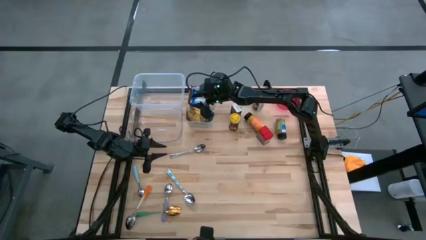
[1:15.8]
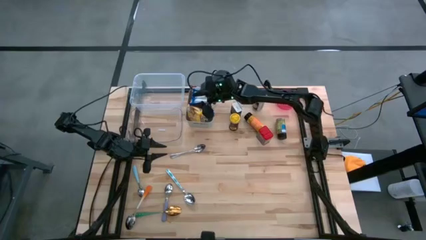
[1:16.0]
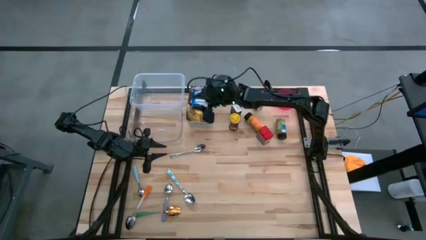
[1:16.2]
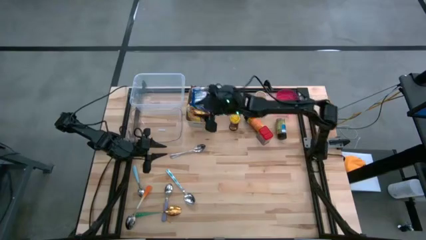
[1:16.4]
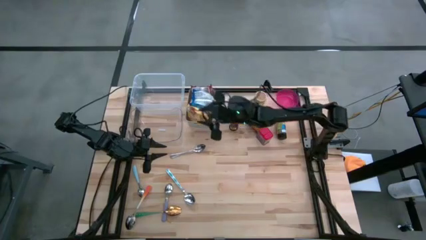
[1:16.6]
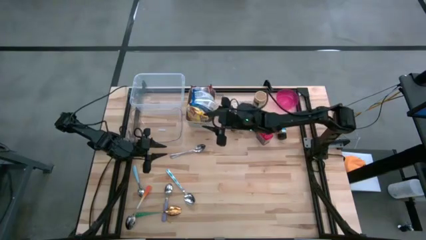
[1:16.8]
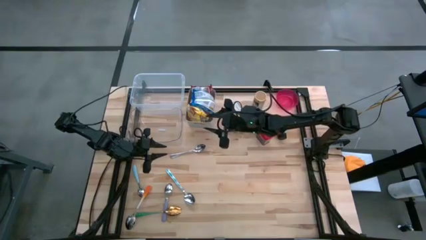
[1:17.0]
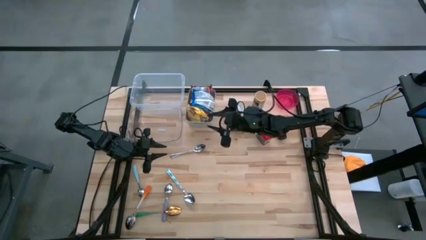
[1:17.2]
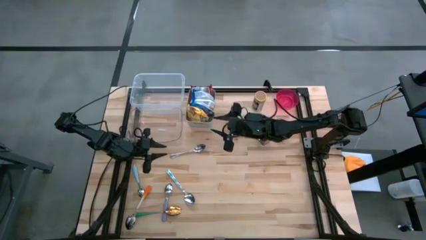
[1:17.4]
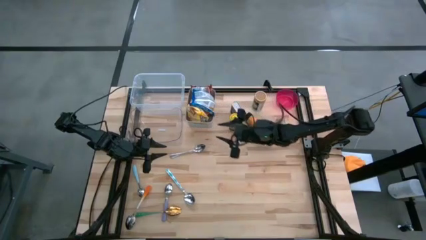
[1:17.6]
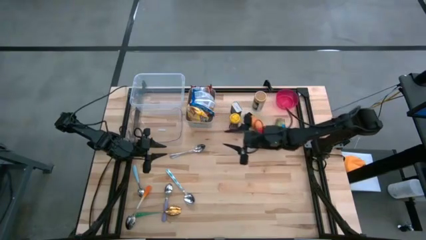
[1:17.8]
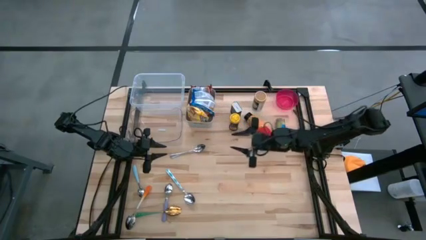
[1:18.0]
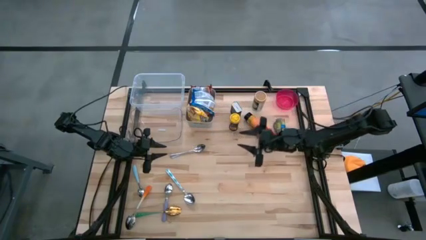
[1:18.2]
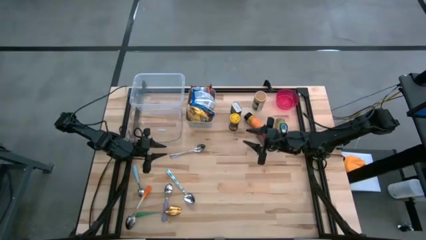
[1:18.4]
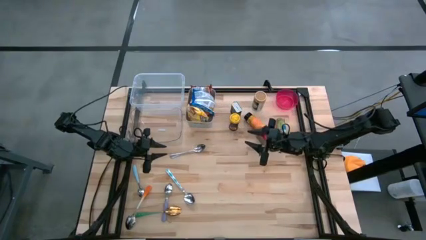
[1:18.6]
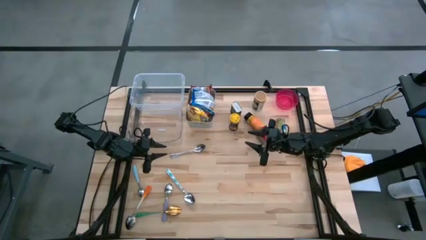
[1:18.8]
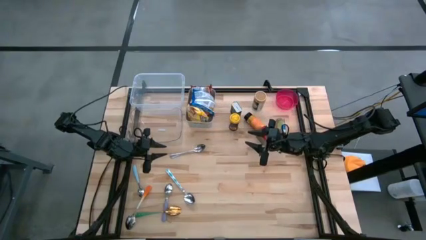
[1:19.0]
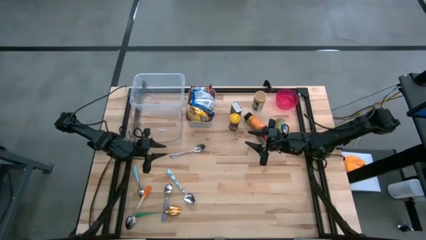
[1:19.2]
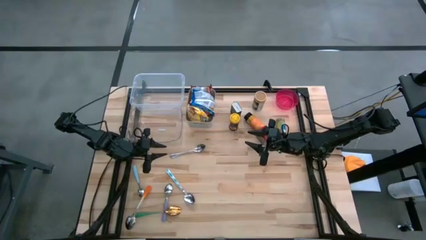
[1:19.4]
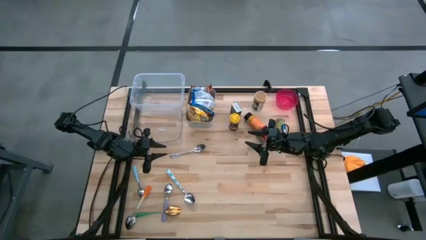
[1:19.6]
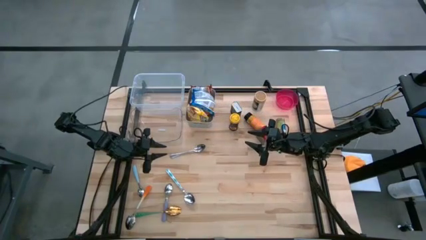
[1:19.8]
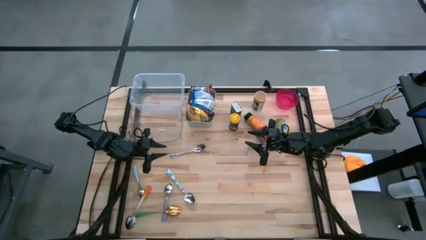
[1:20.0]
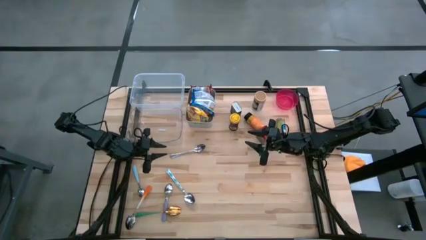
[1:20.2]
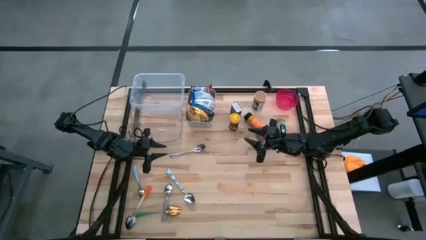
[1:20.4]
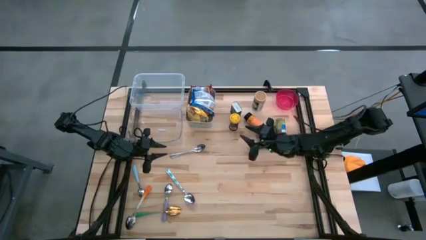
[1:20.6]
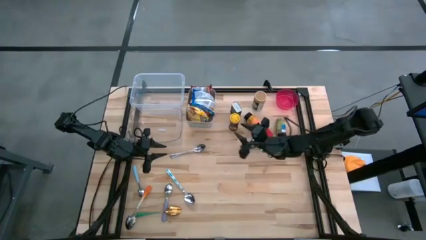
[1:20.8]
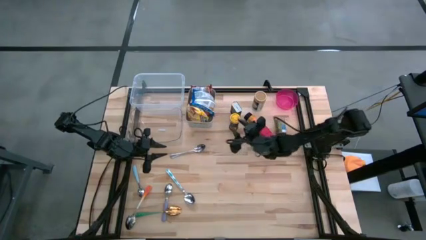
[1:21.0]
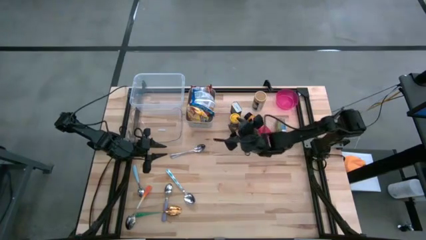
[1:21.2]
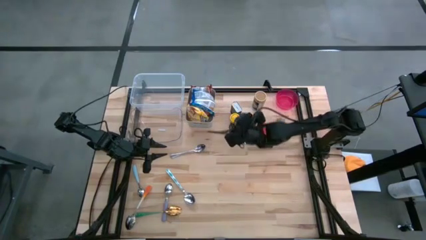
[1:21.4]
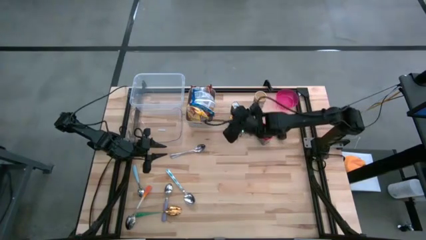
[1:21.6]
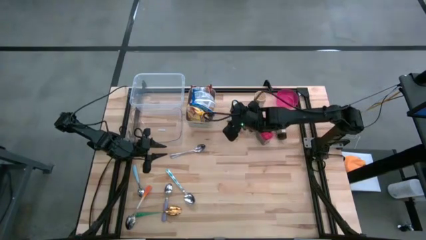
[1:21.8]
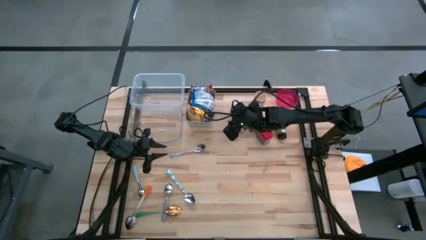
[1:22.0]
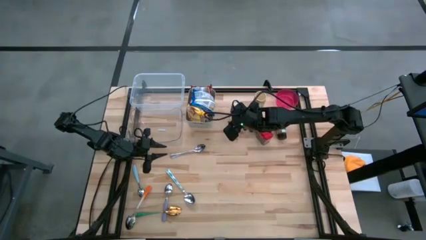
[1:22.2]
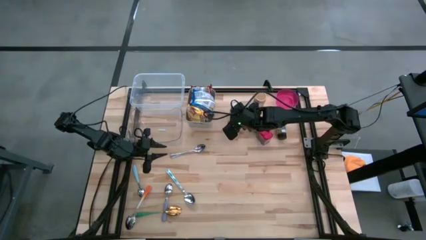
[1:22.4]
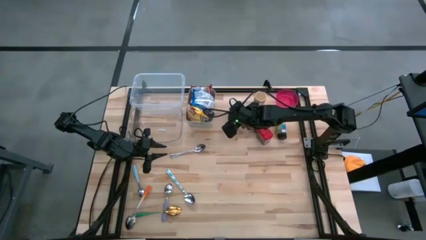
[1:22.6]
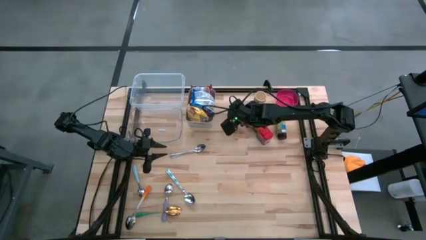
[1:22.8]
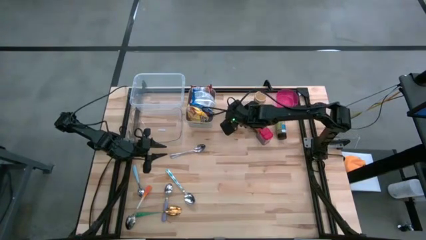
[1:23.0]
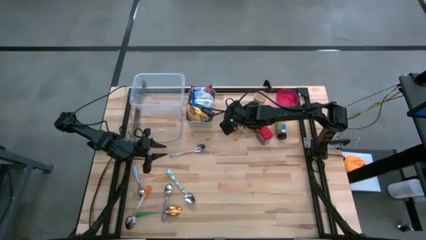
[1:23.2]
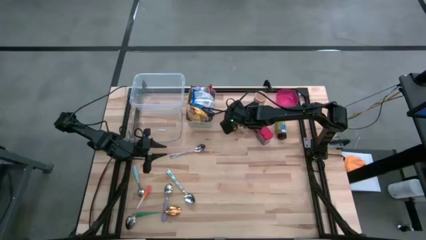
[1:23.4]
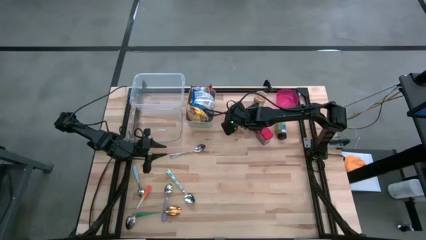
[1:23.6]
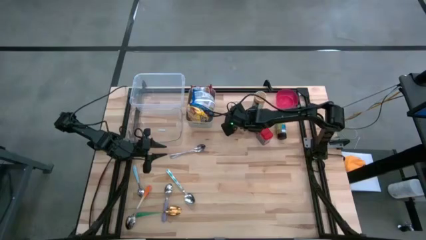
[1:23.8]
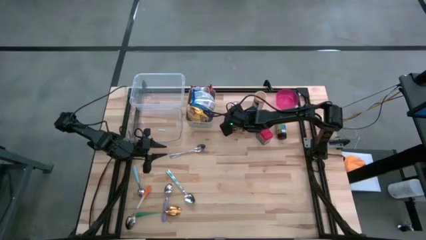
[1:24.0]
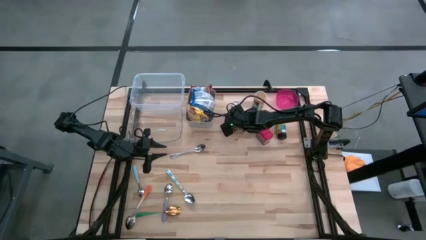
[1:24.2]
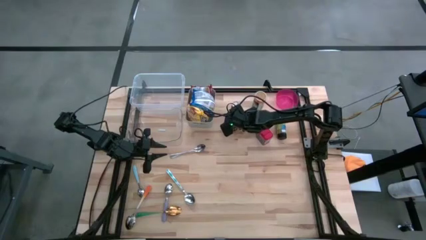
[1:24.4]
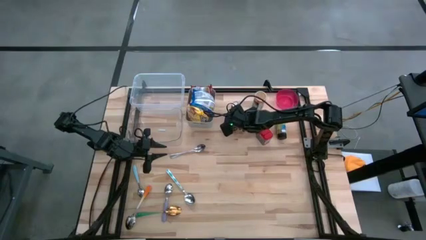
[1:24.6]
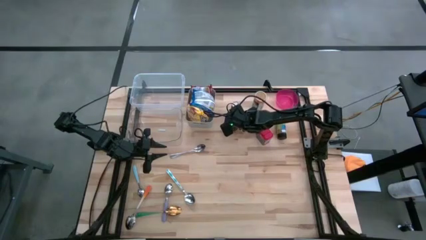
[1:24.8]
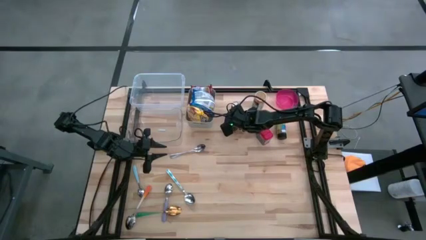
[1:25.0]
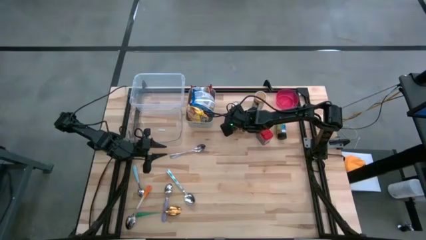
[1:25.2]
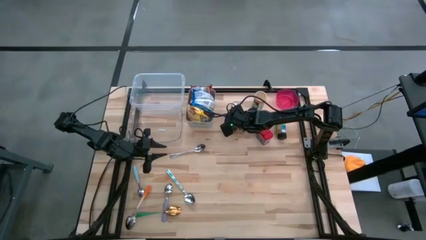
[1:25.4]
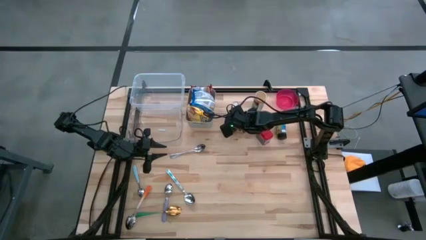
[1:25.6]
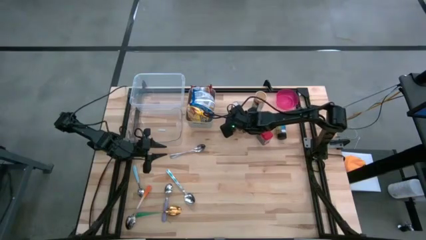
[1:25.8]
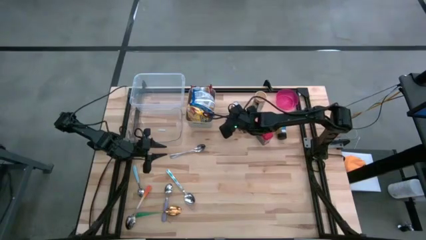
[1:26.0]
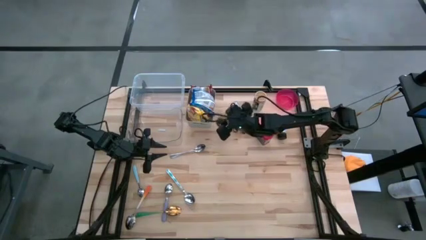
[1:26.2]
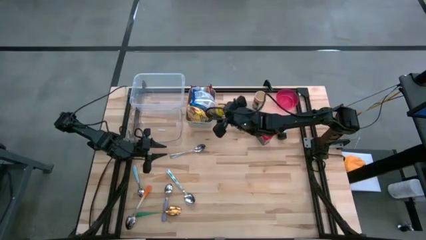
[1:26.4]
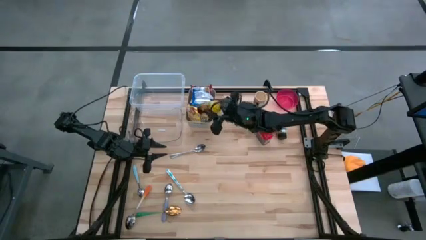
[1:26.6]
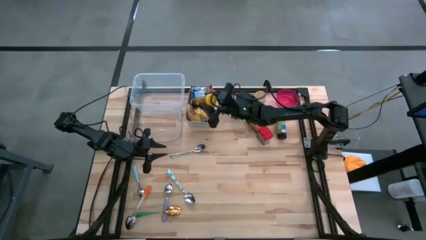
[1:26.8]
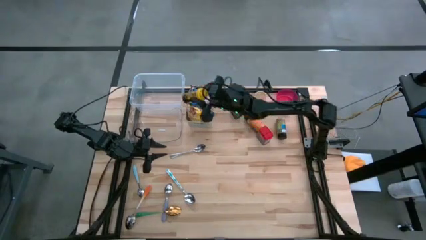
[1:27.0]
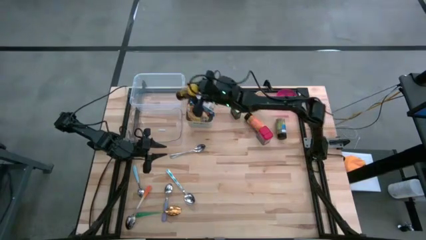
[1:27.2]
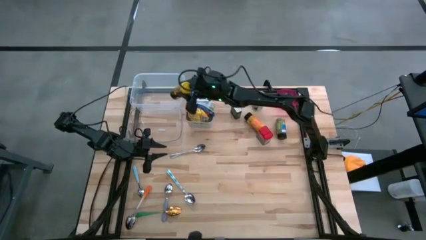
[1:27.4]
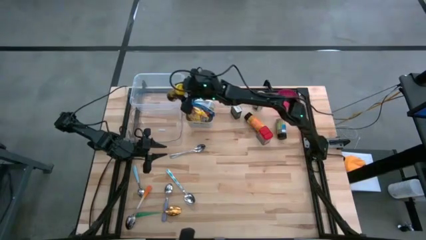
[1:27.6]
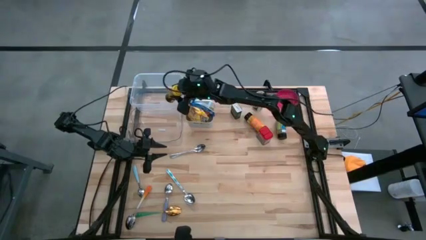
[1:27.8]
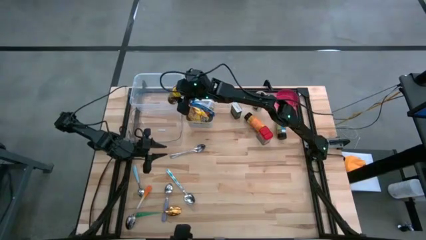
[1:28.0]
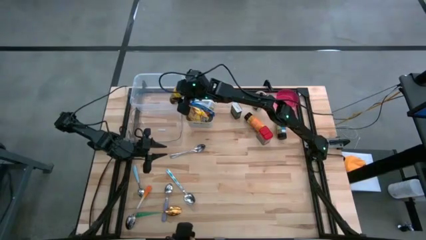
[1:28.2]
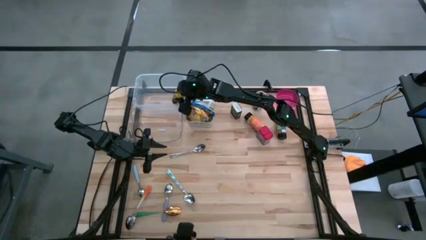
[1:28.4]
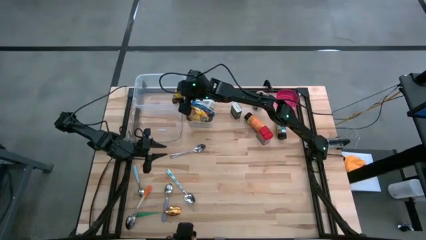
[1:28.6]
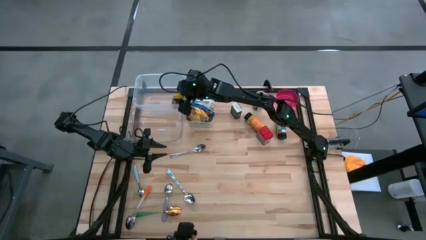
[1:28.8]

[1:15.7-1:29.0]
Put the yellow seasoning can into the white bin

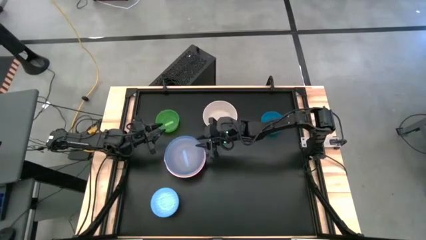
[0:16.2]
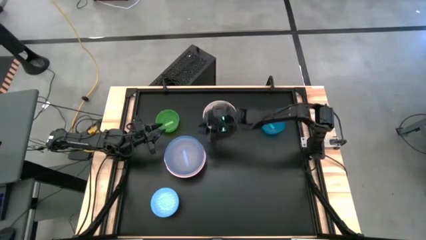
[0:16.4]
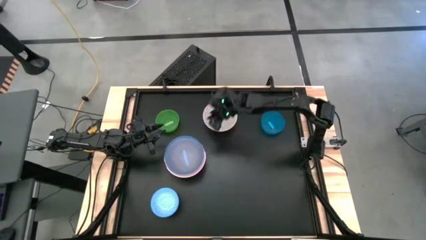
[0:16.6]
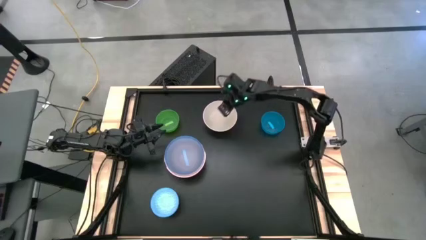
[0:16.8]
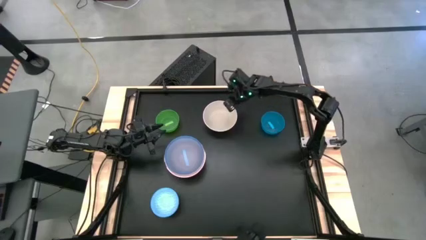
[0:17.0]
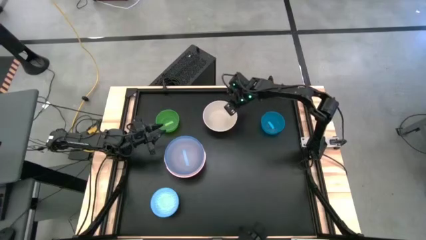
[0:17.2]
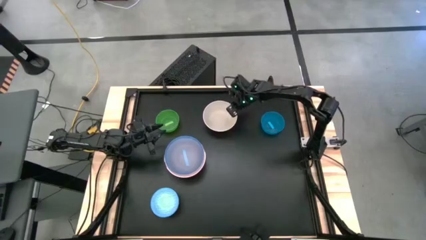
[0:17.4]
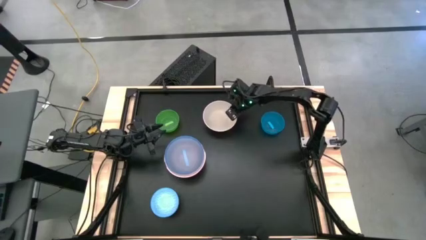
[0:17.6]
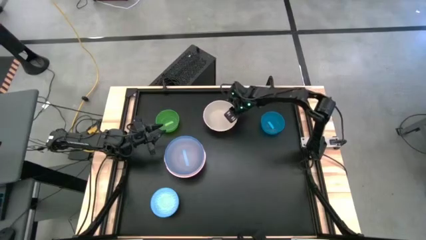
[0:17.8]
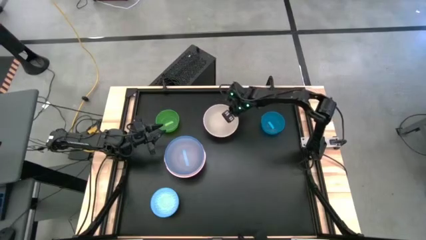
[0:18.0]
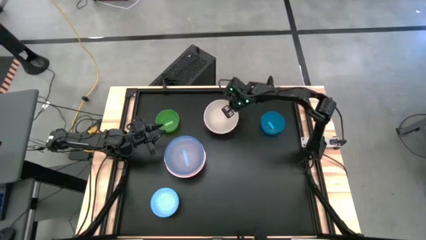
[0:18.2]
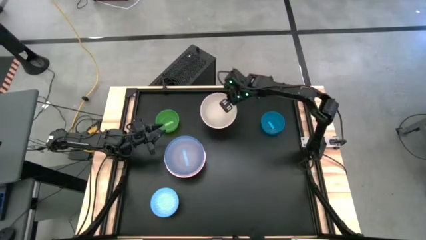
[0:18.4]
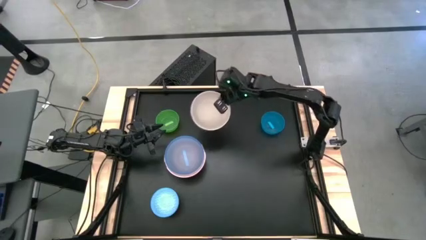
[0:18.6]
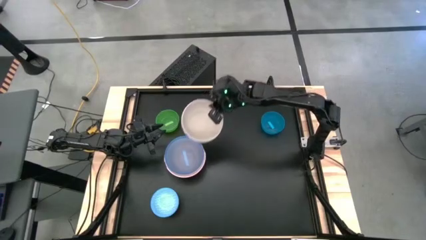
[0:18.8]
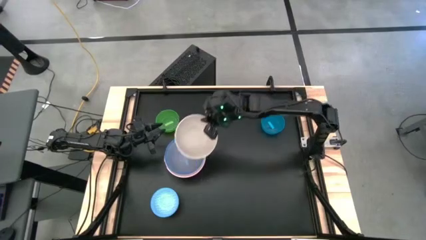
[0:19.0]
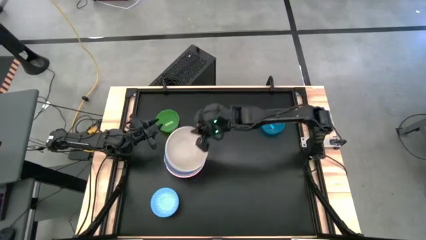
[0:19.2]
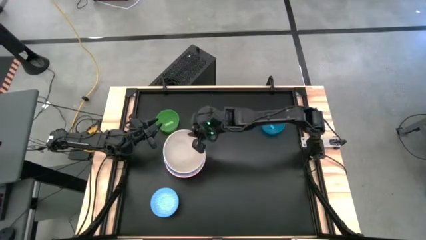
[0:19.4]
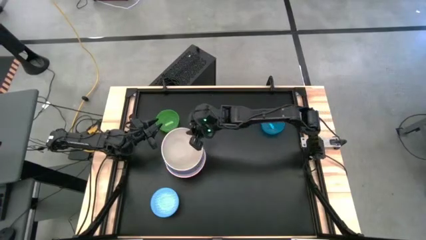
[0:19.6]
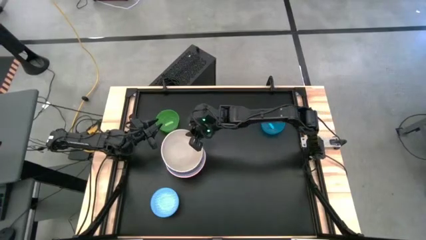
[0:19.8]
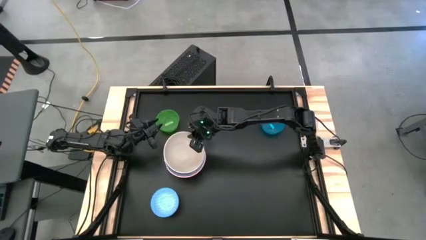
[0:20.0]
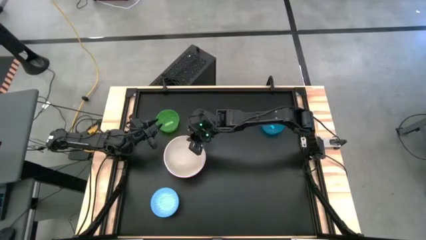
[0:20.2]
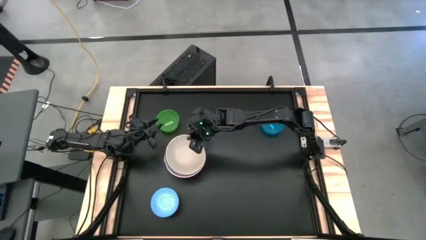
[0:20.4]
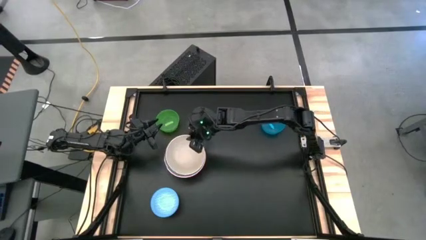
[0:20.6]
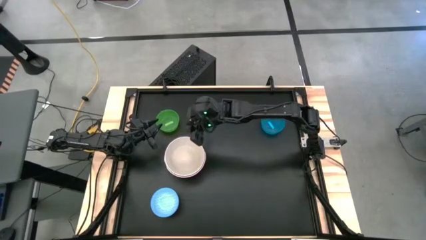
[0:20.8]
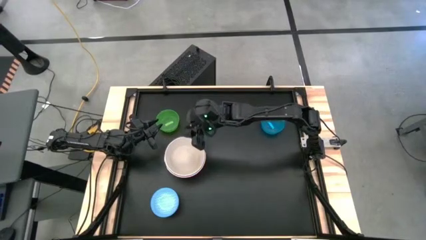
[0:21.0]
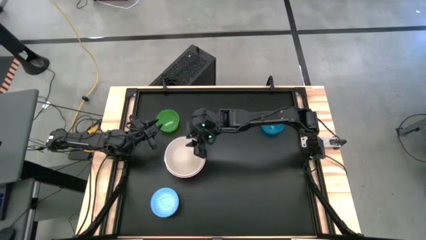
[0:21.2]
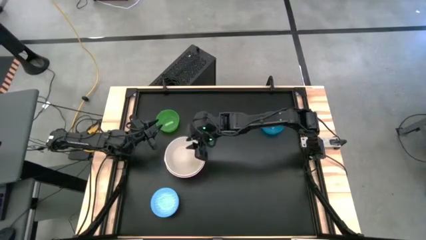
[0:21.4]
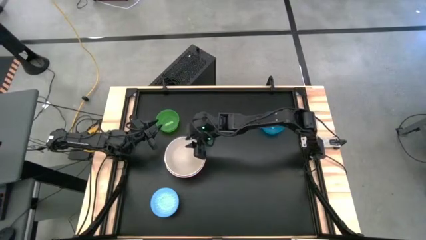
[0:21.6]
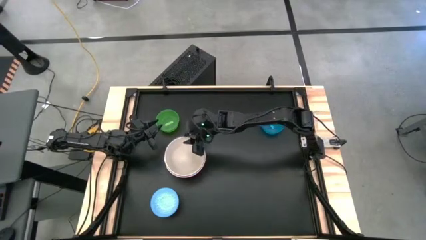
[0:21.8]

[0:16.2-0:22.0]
Stack the white bowl on top of the large blue bowl
